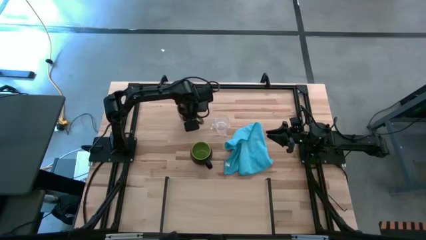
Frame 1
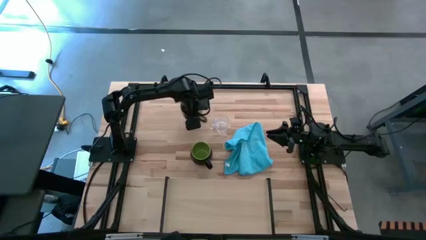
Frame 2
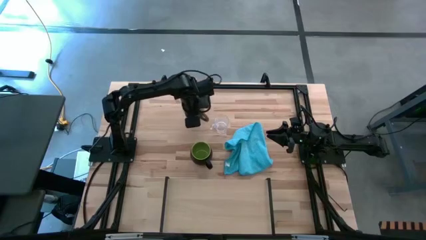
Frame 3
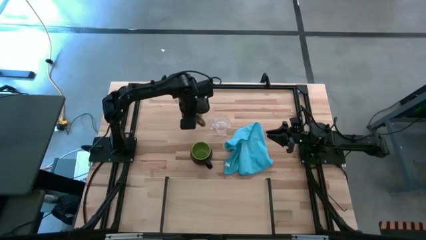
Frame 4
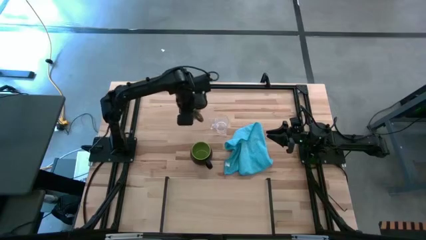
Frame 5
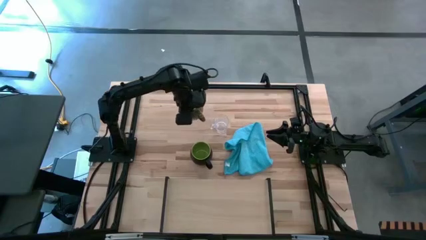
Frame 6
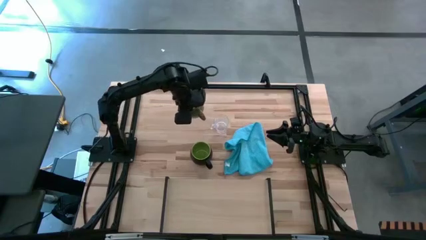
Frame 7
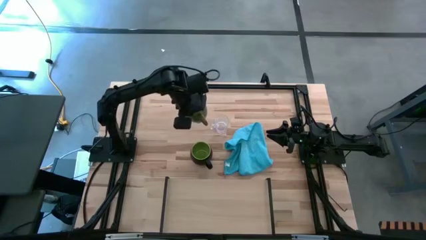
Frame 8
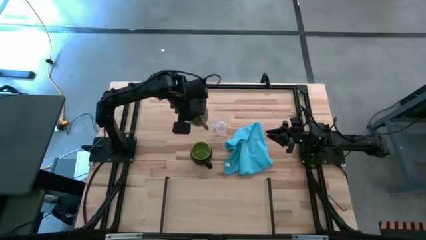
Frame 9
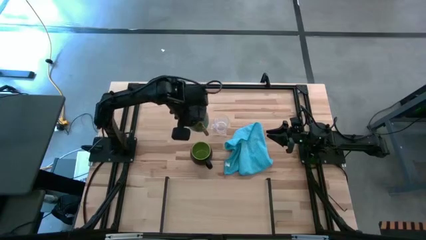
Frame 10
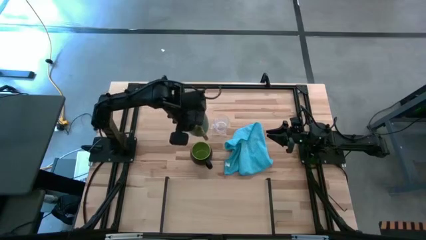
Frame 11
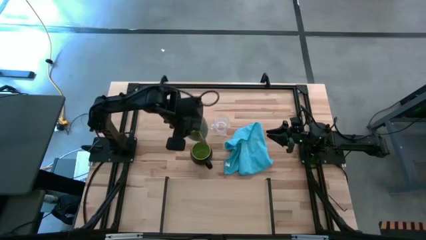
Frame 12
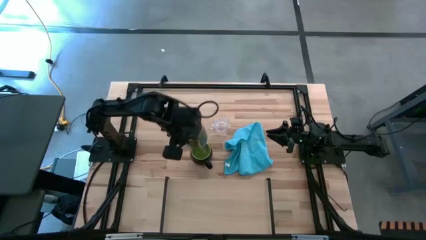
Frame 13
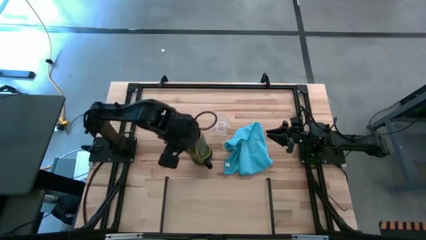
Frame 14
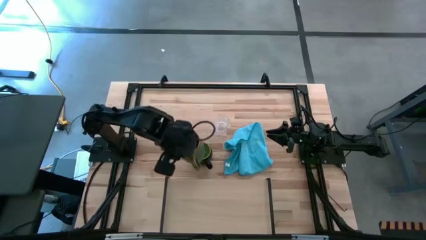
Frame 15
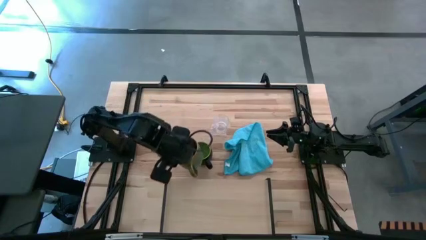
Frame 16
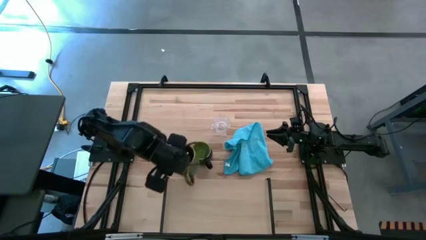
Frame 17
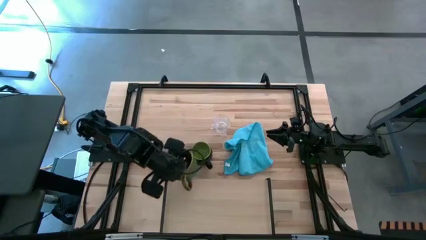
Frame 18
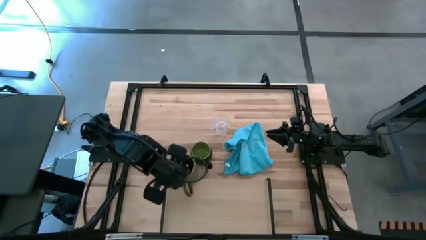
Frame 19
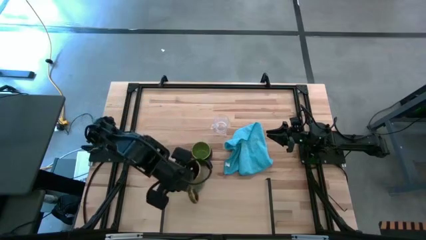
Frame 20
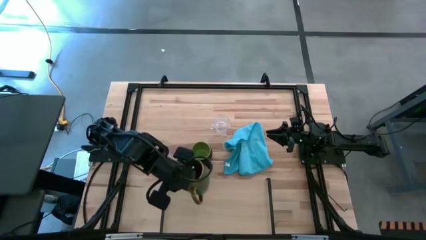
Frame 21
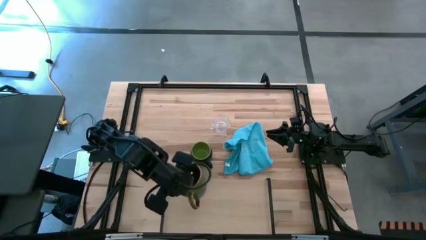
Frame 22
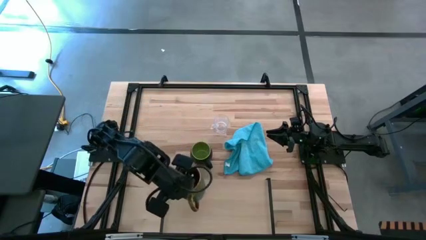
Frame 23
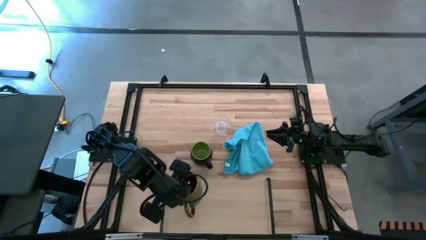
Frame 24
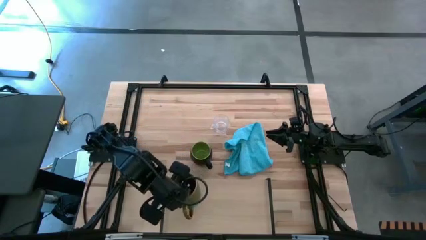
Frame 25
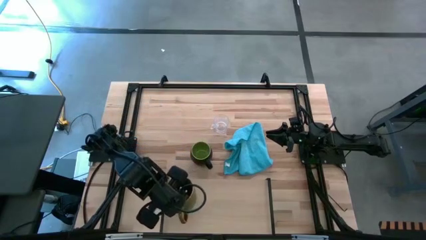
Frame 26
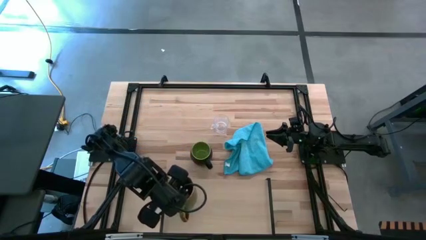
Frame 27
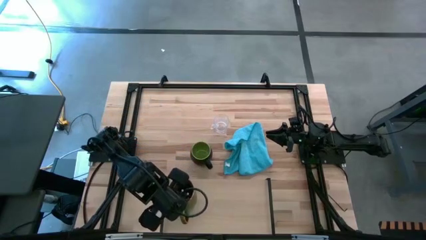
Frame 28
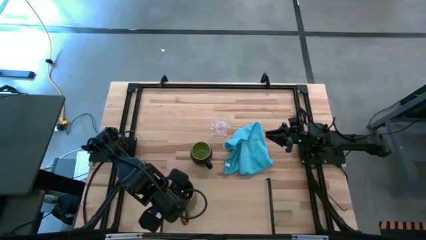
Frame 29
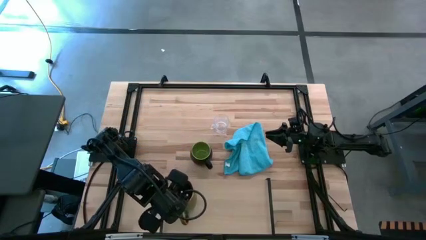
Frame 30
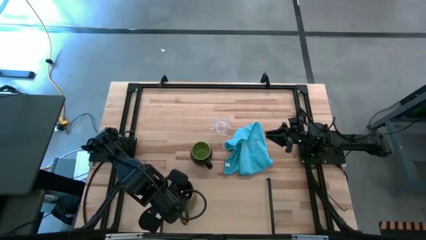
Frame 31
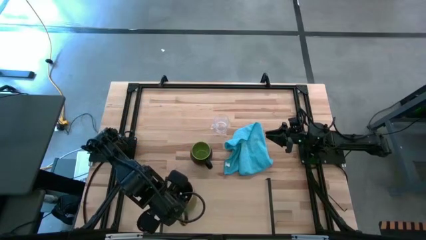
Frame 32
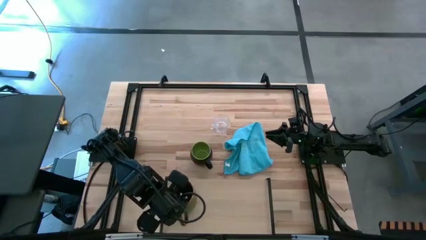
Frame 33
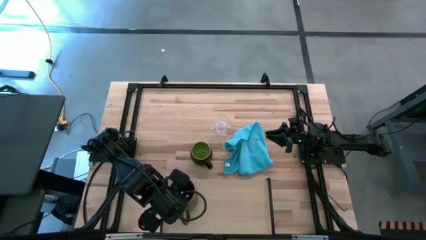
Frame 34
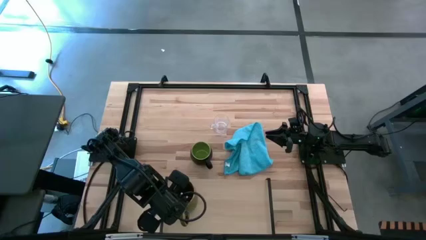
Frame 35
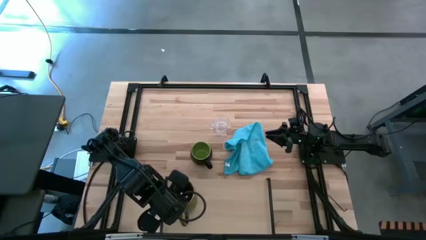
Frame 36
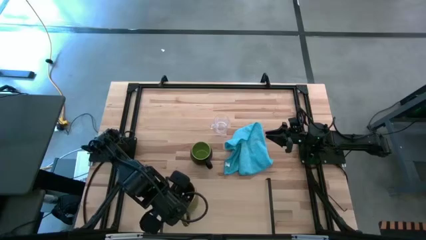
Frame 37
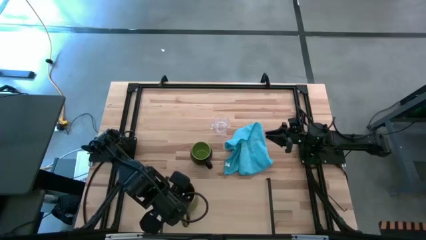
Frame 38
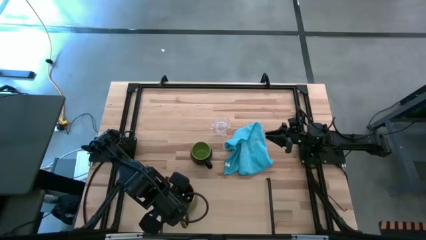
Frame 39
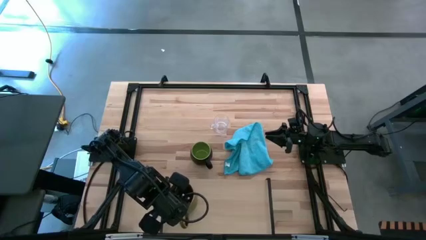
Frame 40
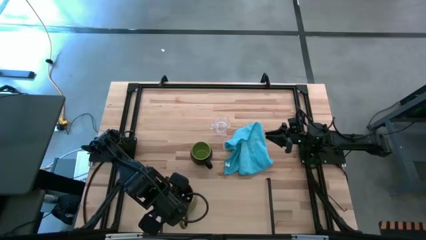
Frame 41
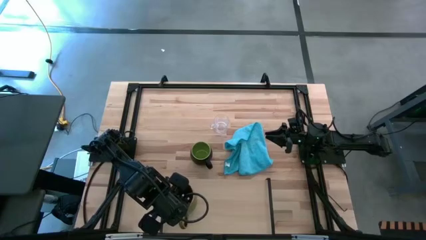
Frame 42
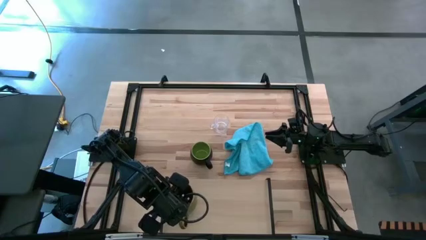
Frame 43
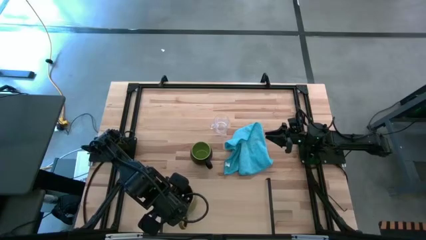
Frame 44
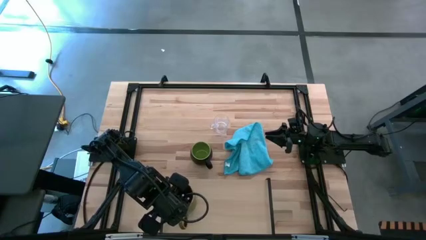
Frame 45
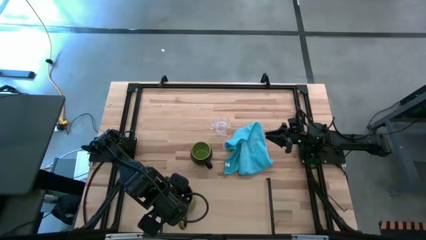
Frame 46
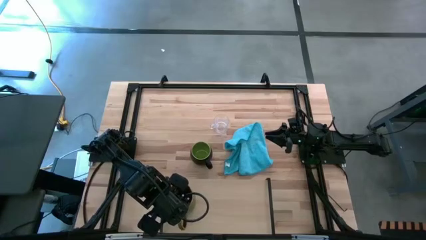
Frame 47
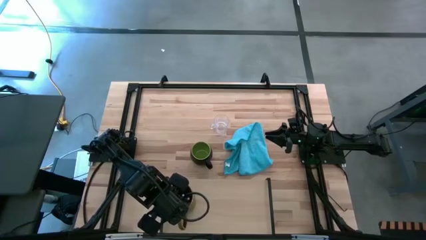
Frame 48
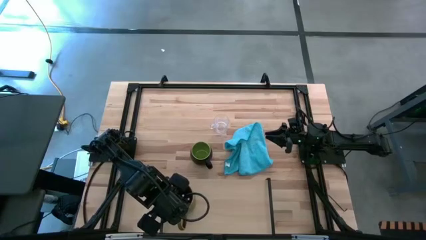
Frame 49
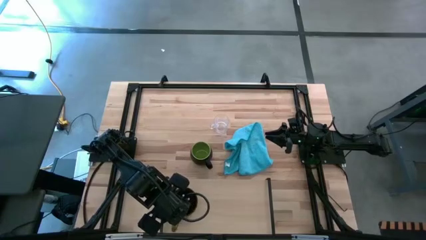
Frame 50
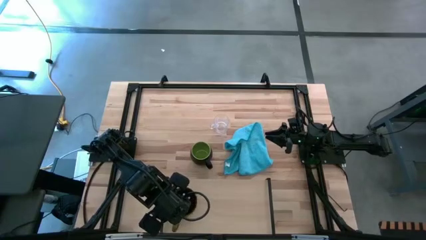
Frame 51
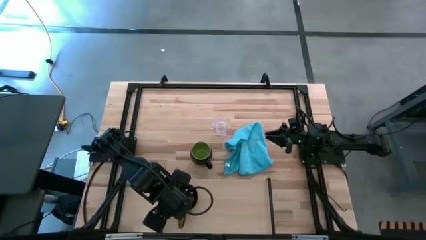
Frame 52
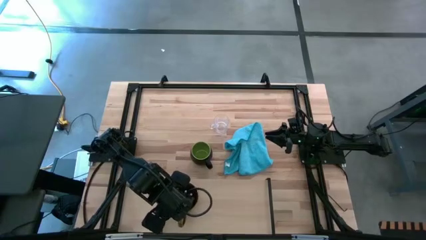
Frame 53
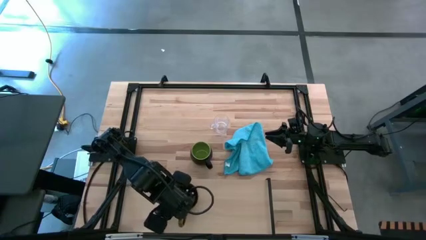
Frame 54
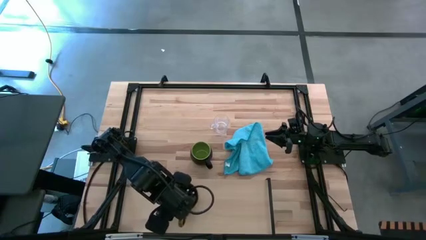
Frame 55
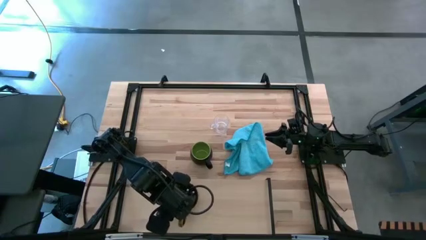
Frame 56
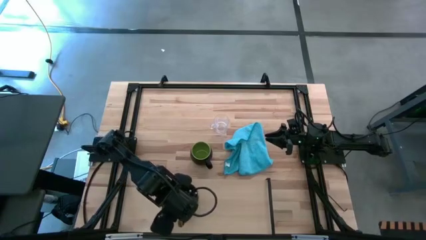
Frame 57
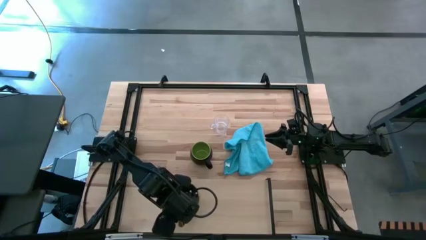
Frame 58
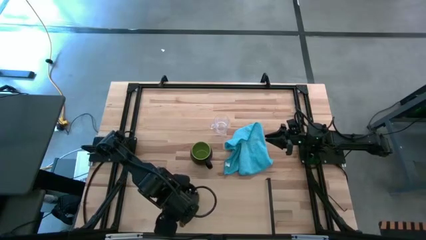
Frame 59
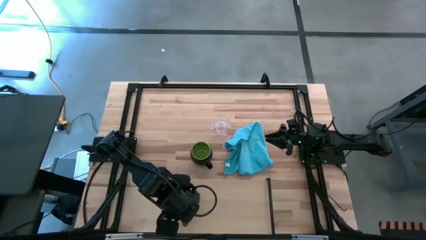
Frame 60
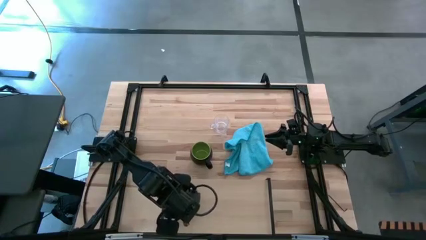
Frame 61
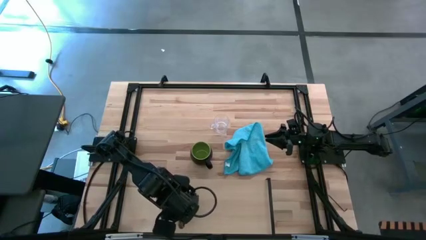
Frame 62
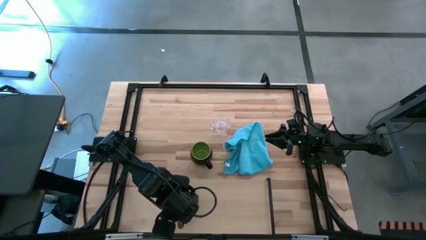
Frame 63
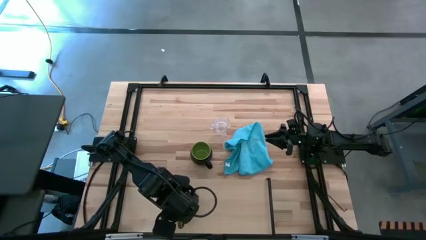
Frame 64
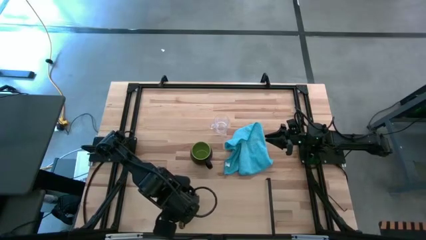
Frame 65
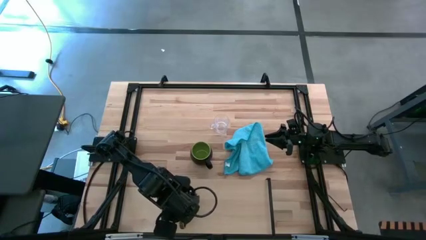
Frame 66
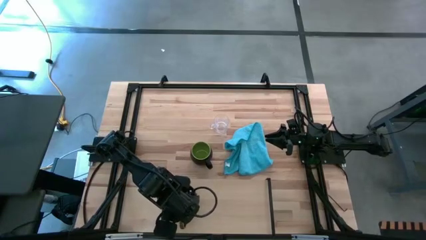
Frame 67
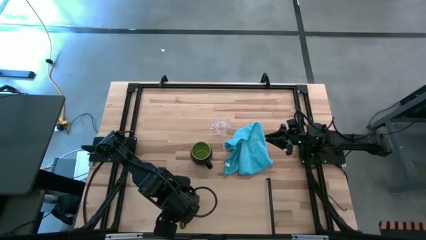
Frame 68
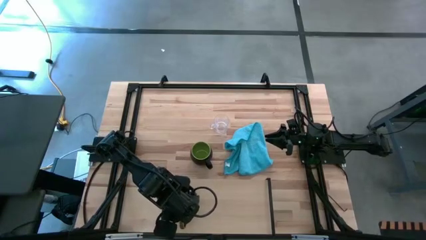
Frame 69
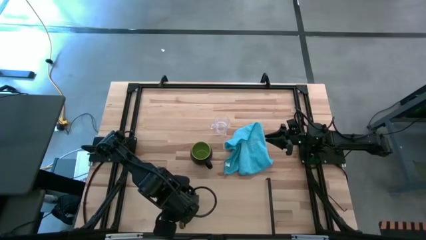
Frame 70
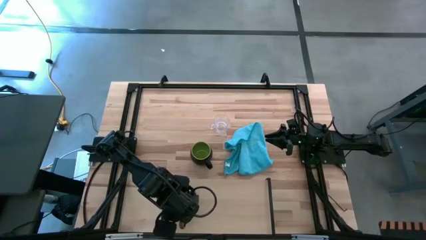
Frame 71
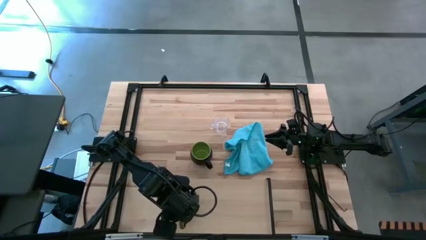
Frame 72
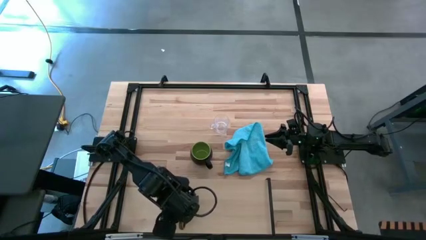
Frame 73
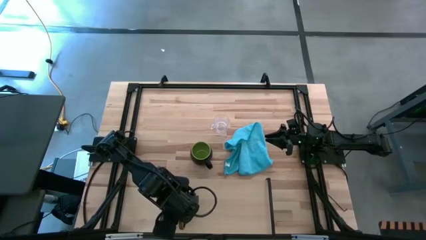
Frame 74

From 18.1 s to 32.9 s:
Task: Stack small to large cups/mugs on shelf
Put the brown green mug on the shelf
